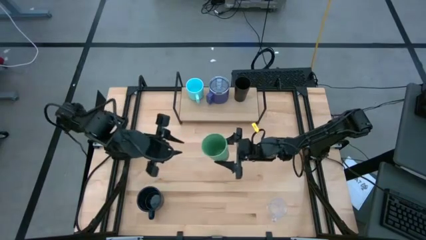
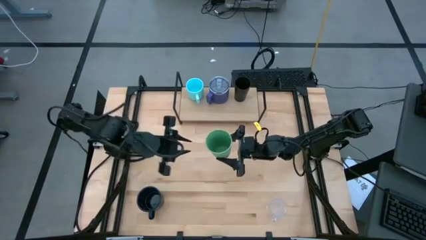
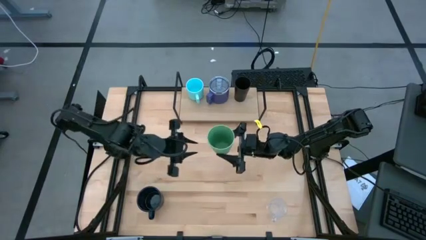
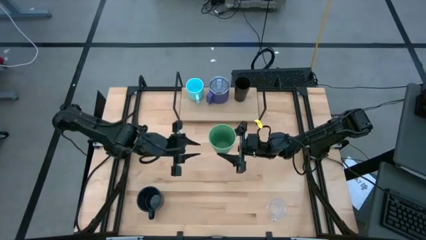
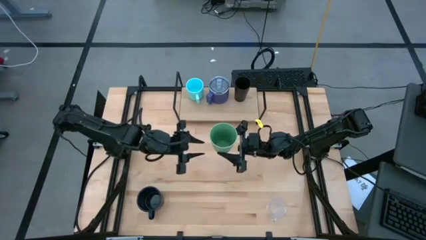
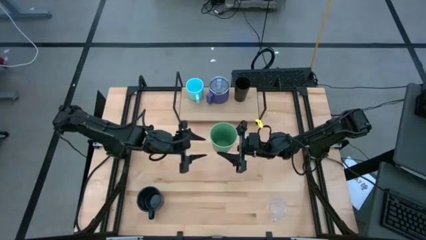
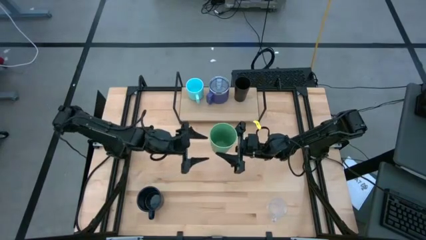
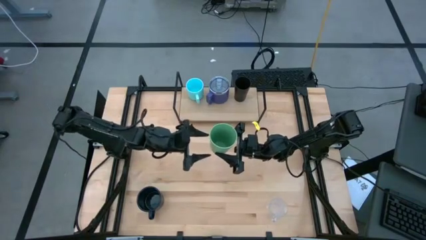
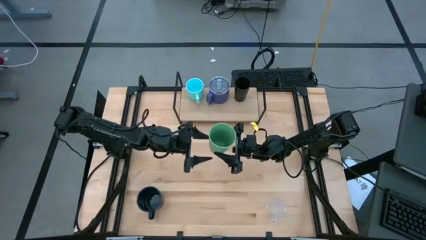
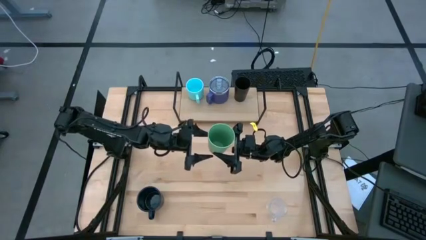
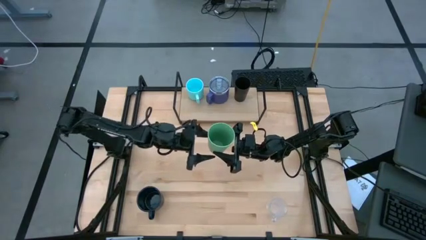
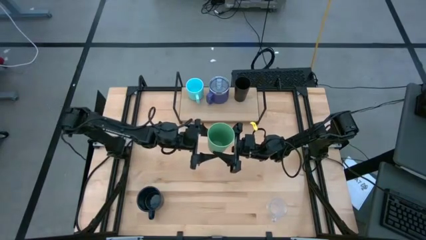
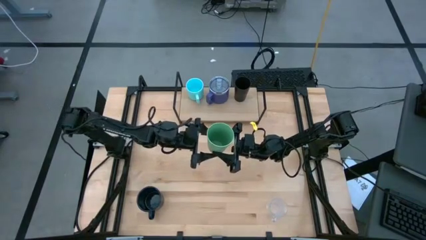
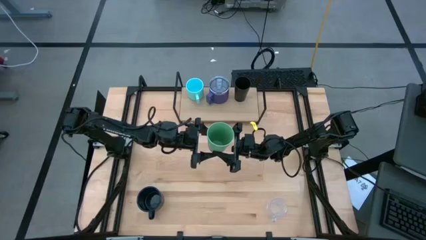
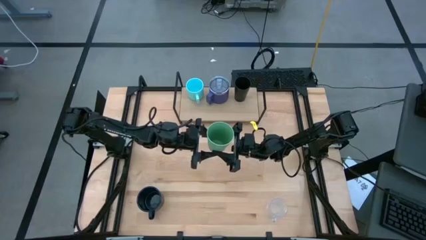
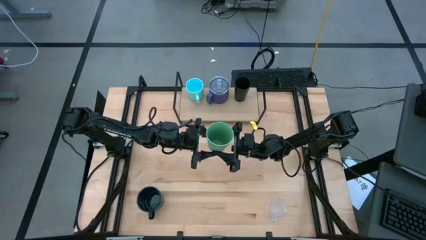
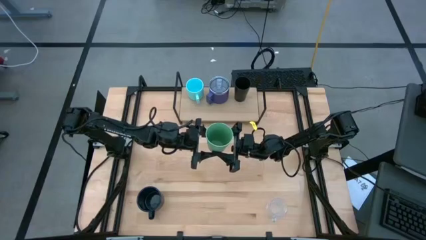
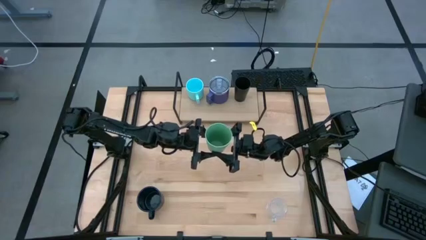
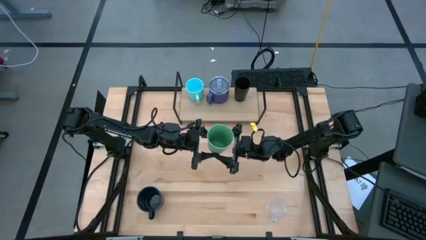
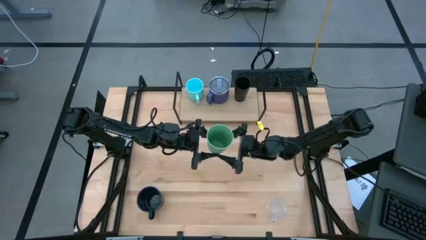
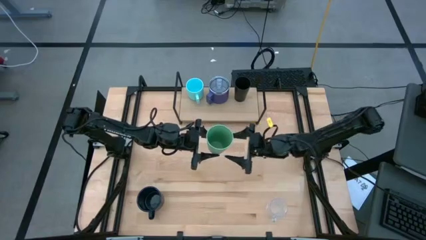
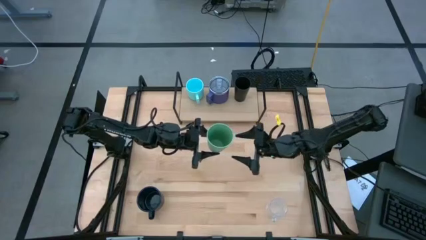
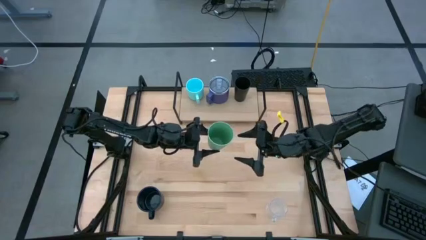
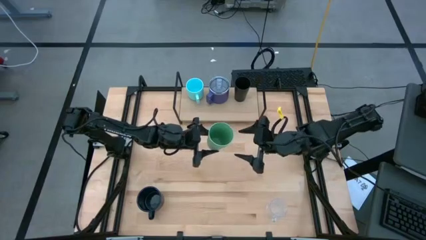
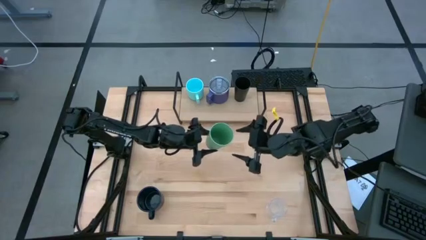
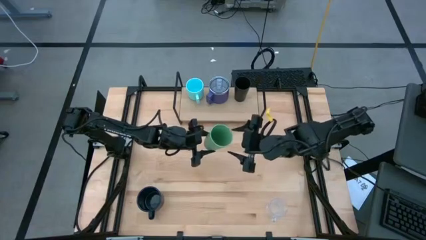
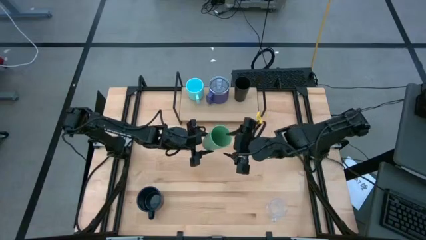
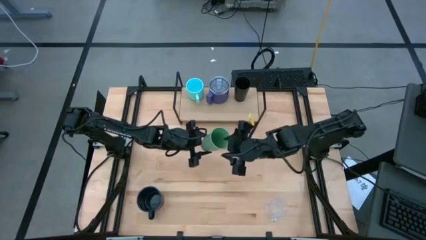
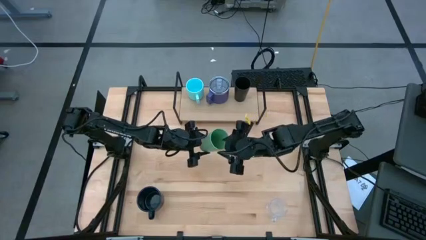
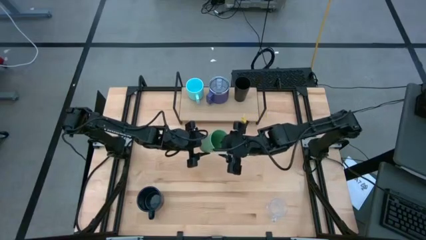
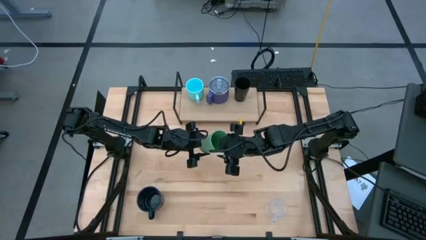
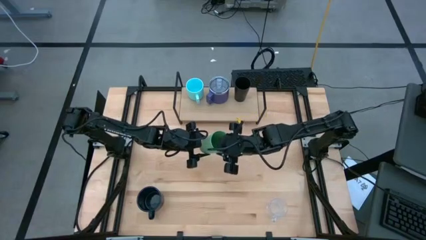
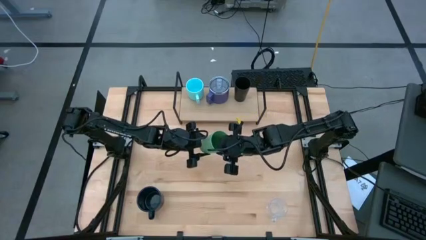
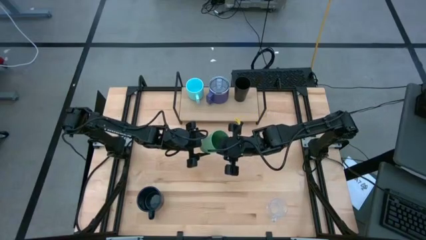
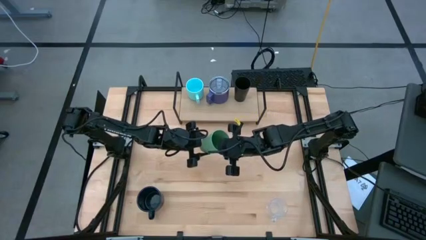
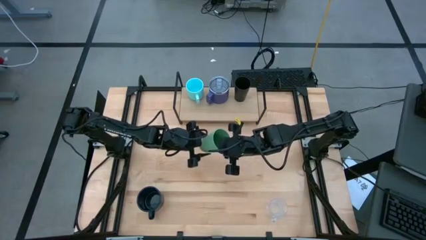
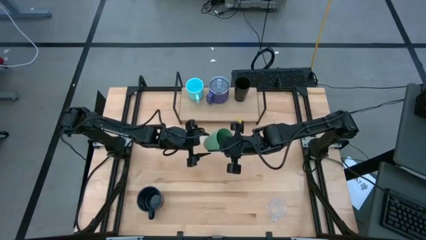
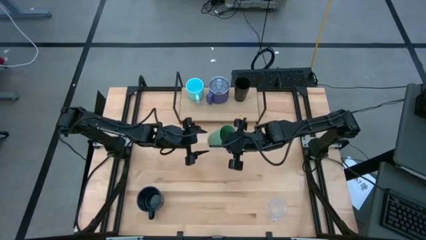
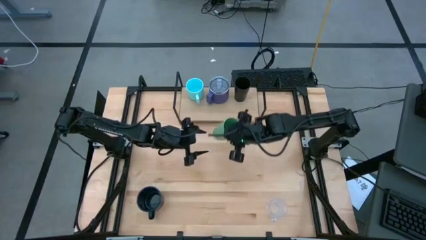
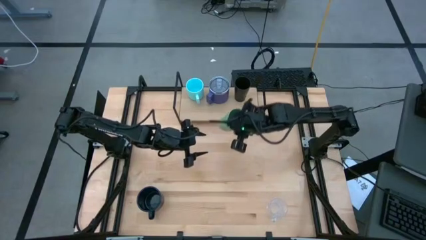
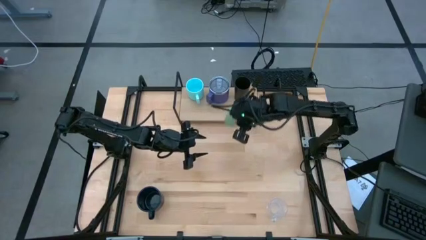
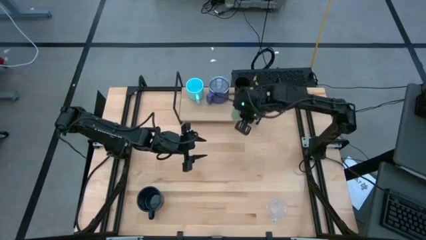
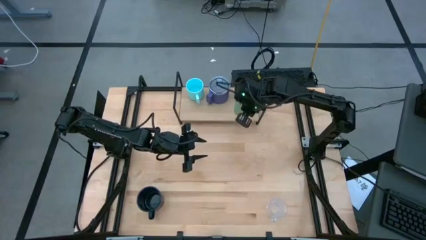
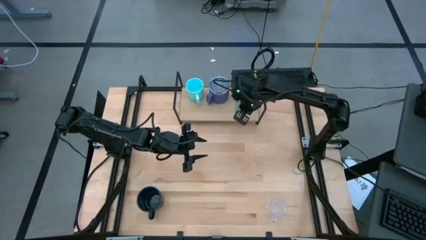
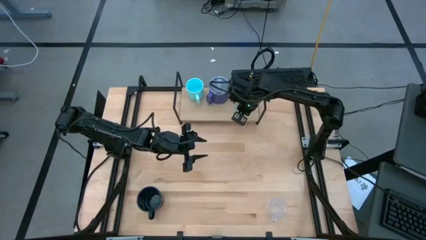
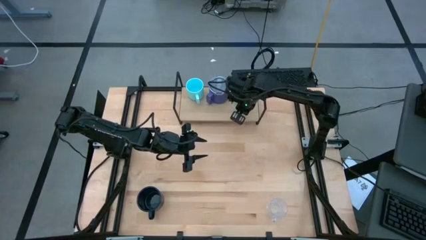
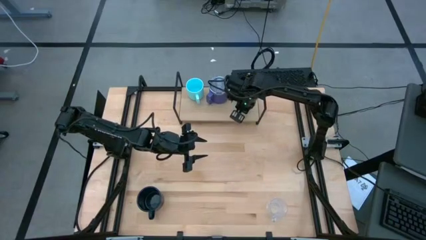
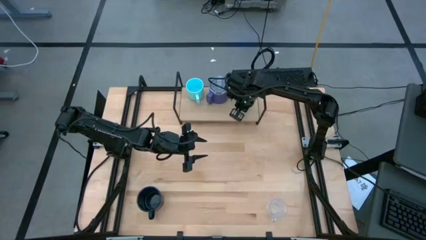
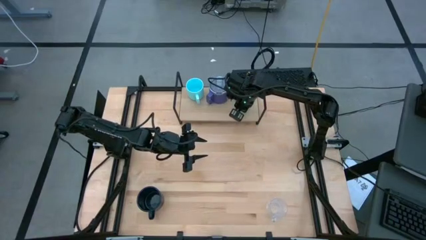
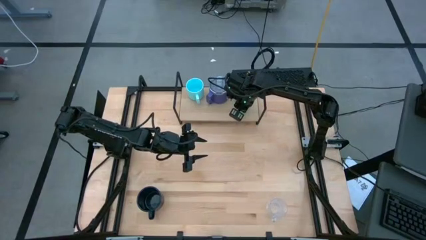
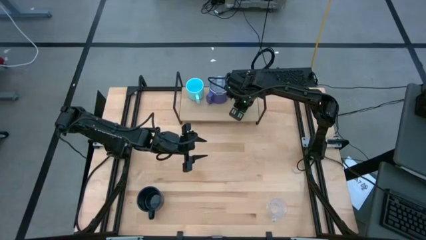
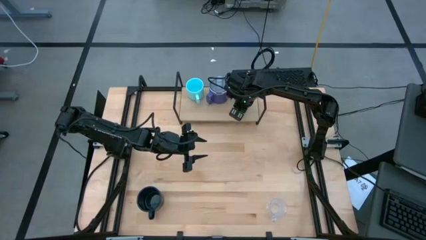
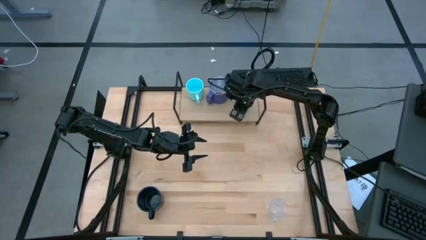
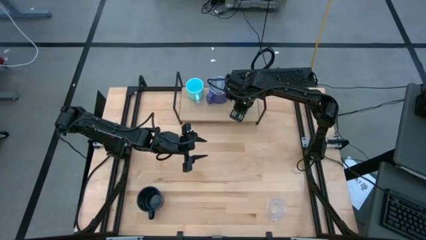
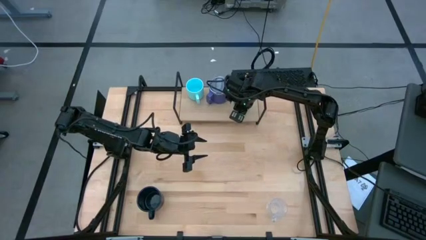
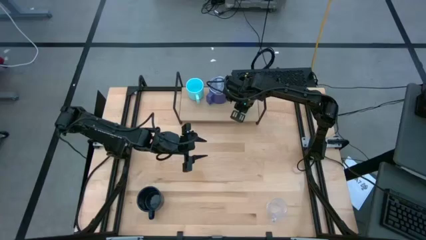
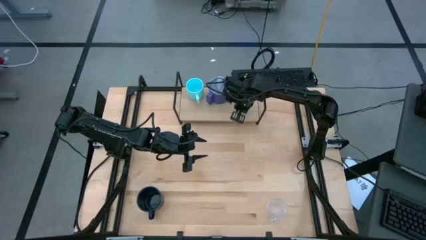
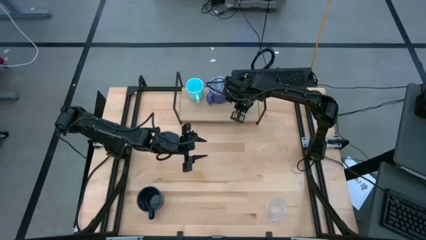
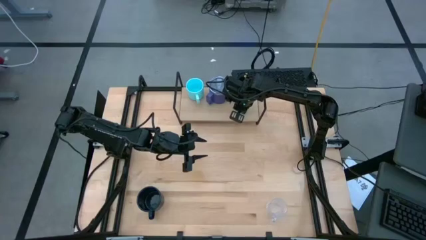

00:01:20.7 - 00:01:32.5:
Task: Stack small to large cups/mugs on shelf
Put the green cup on the shelf

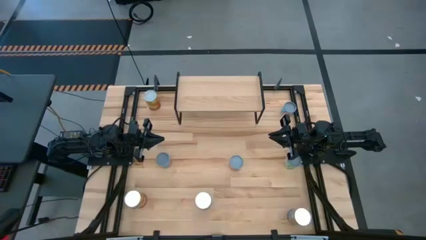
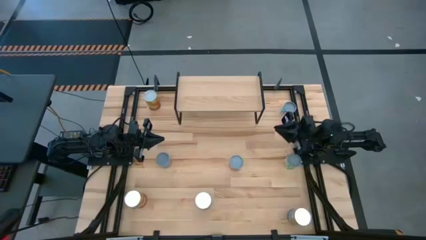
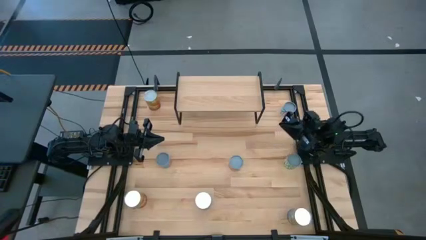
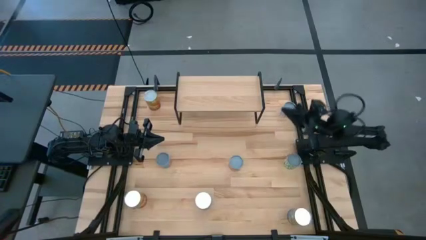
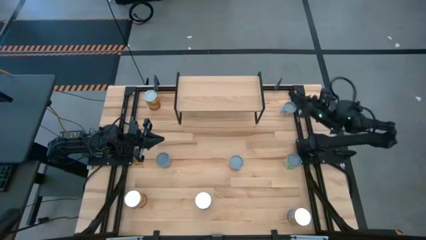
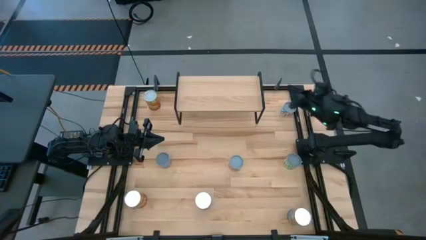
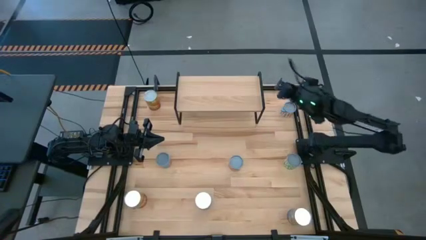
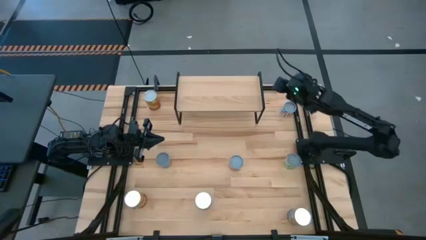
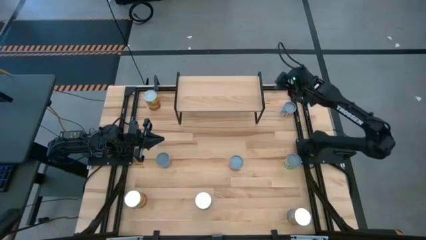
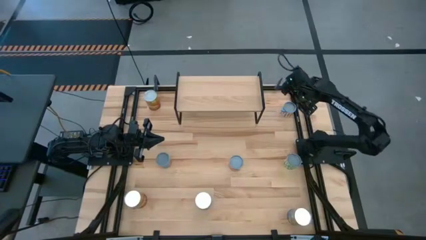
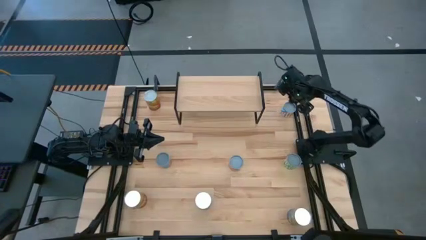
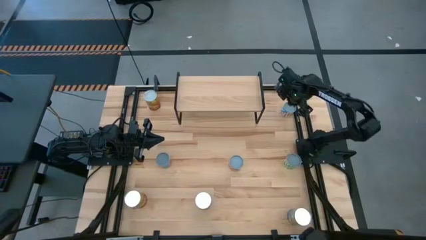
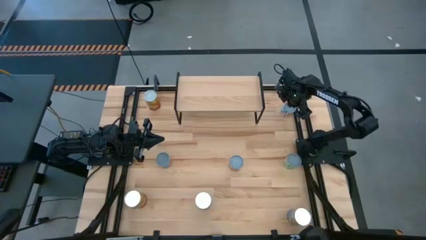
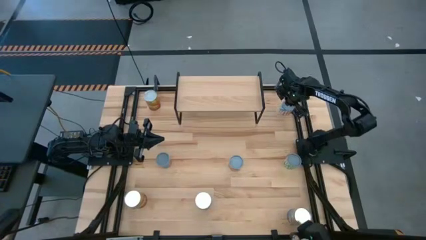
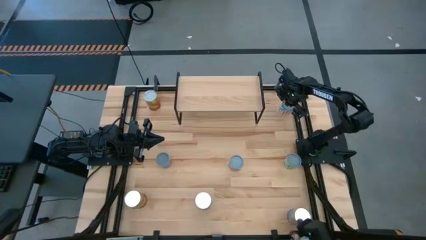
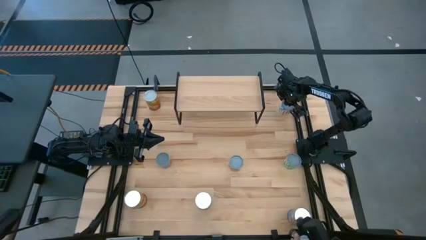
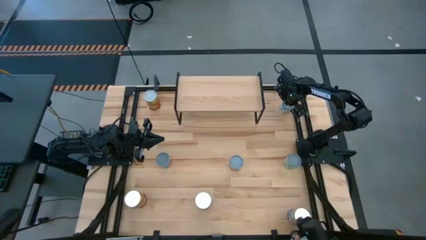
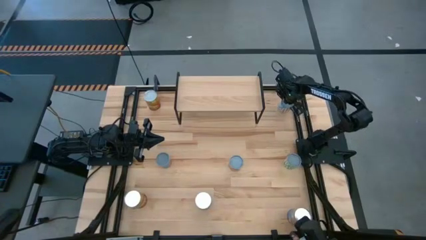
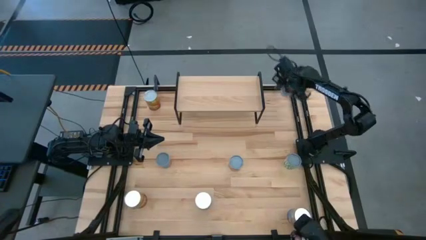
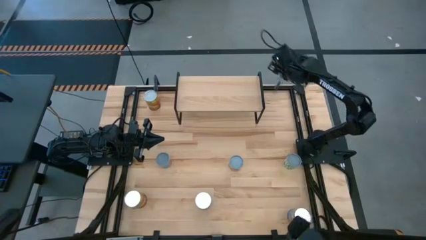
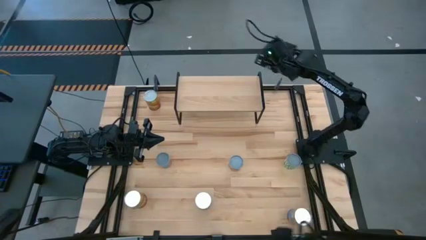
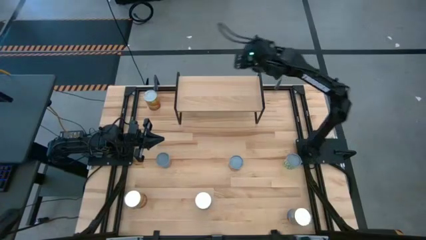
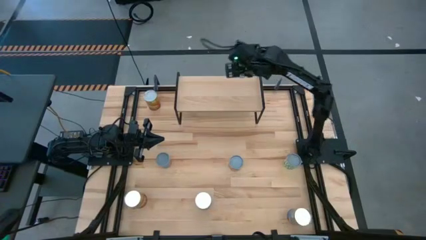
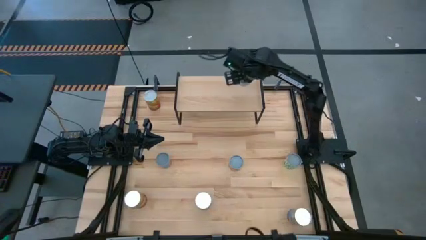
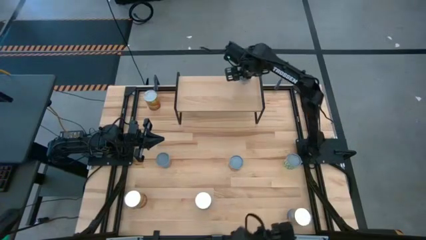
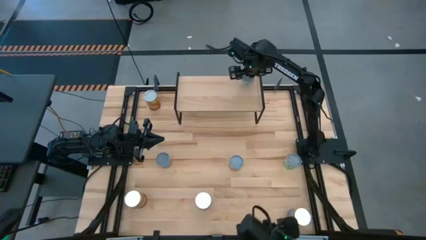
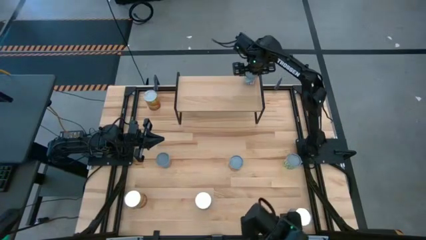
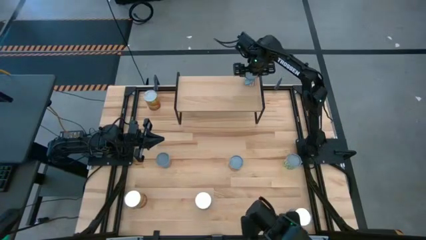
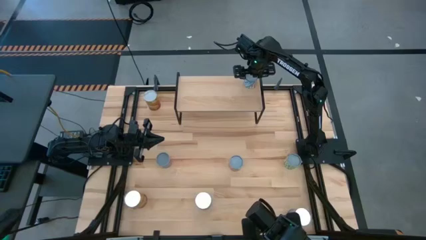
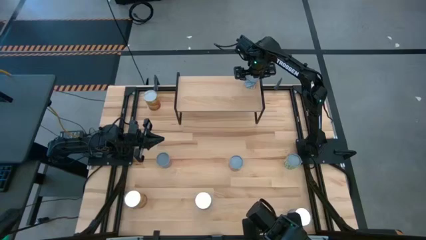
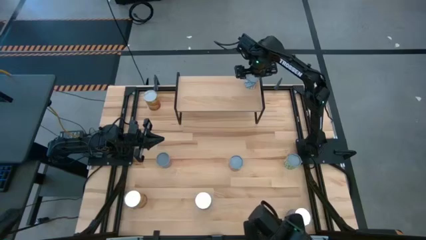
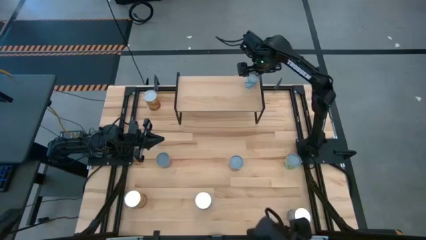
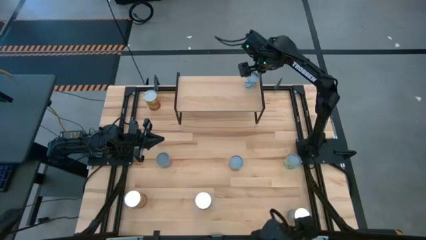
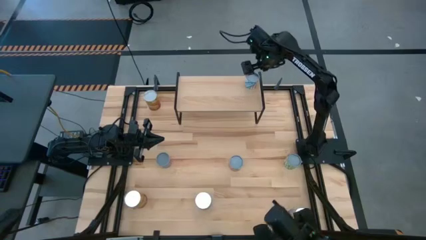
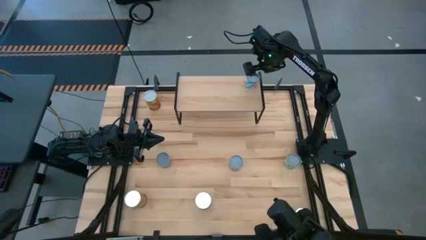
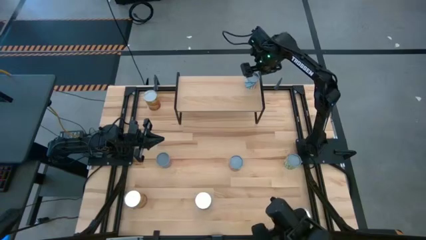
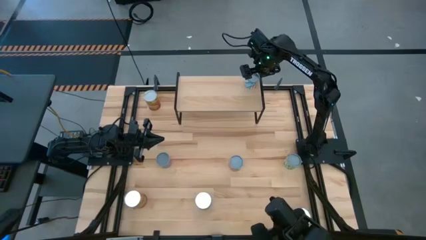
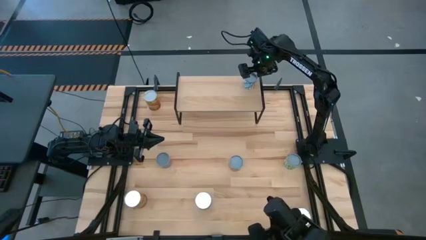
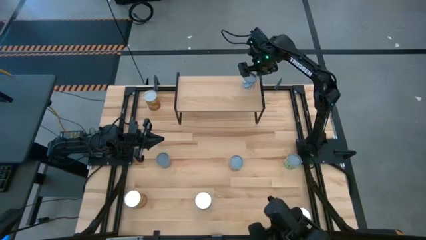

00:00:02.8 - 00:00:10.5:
Task: Pick and place cans onto a shelf
Put the canned carrot on the shelf
